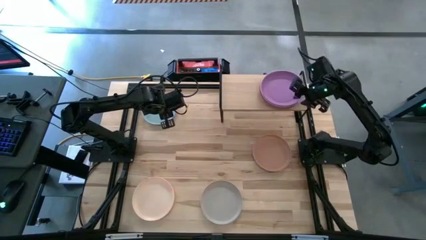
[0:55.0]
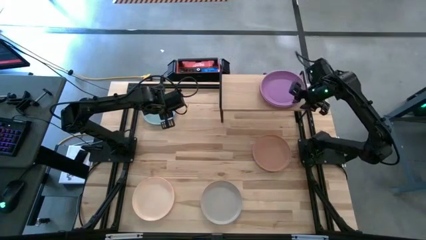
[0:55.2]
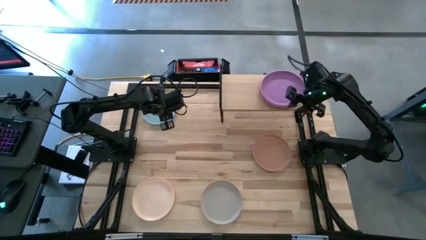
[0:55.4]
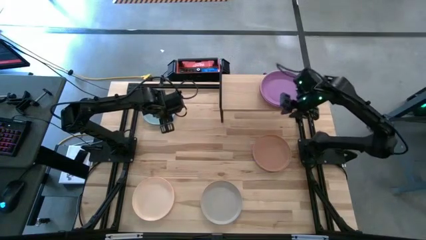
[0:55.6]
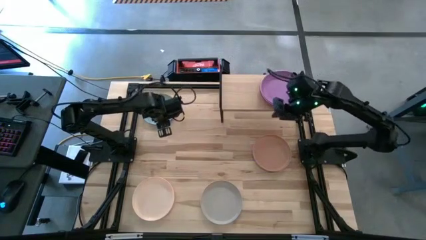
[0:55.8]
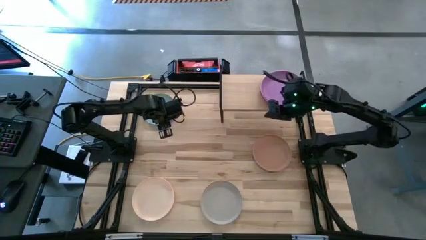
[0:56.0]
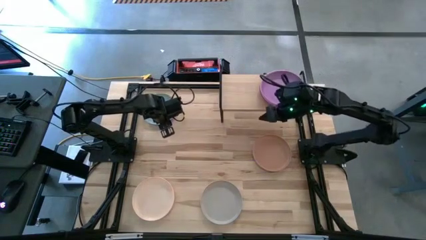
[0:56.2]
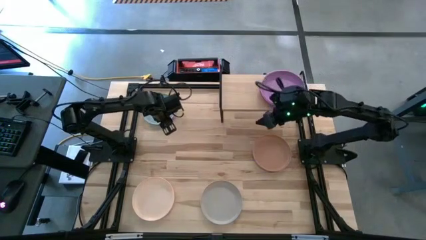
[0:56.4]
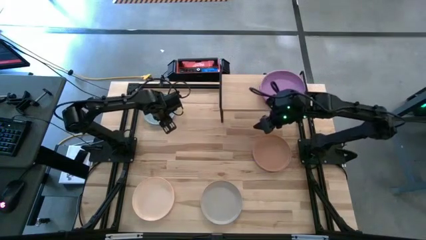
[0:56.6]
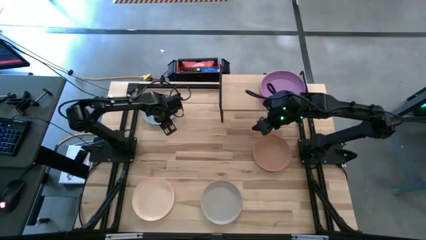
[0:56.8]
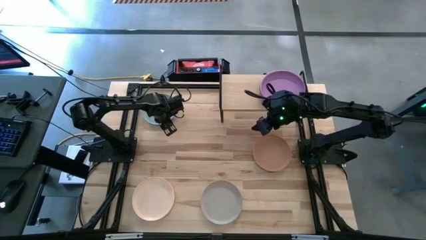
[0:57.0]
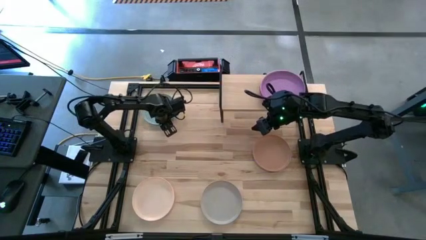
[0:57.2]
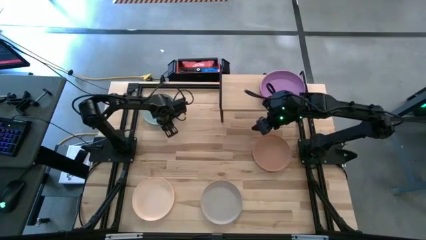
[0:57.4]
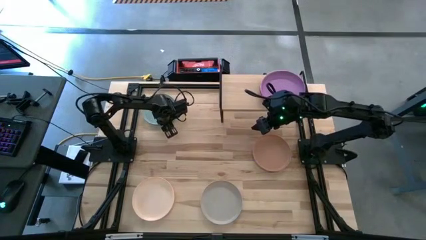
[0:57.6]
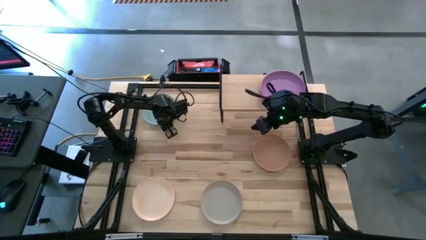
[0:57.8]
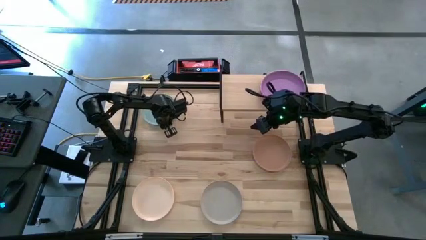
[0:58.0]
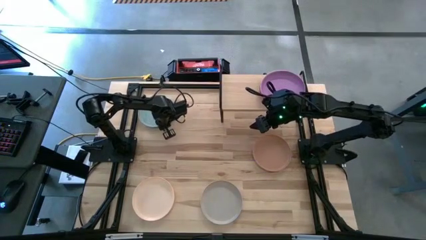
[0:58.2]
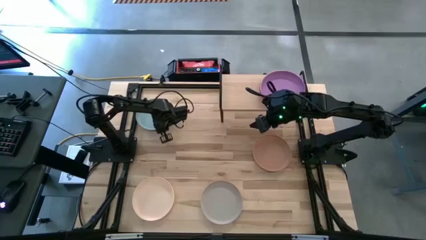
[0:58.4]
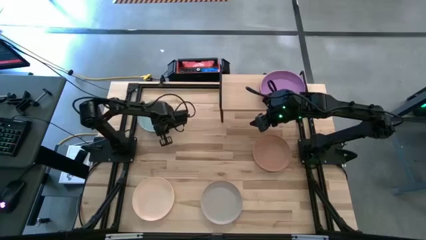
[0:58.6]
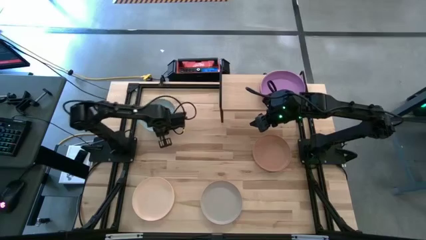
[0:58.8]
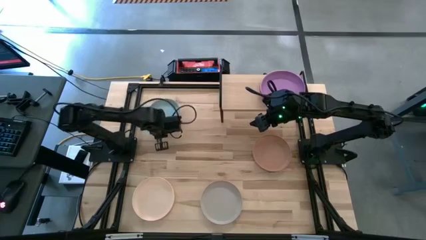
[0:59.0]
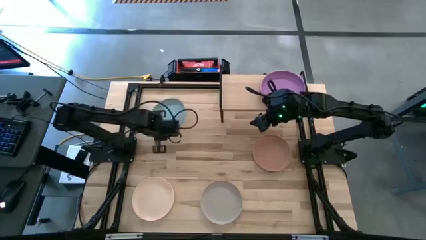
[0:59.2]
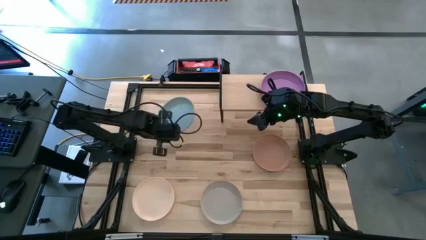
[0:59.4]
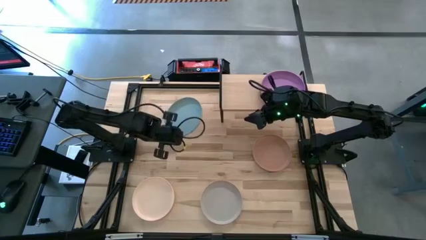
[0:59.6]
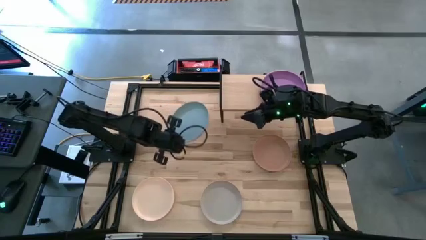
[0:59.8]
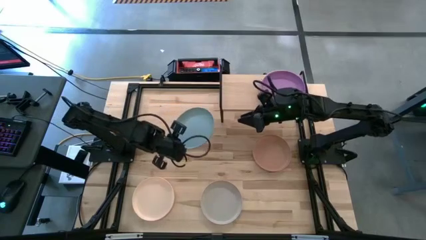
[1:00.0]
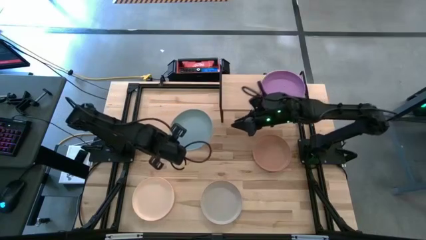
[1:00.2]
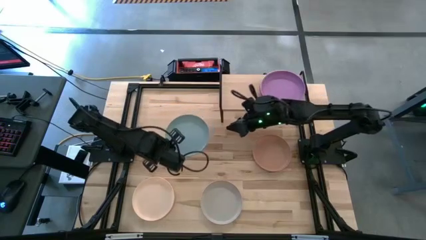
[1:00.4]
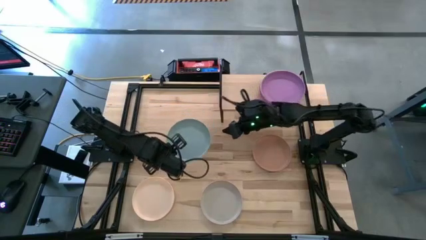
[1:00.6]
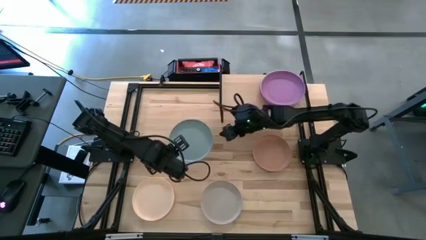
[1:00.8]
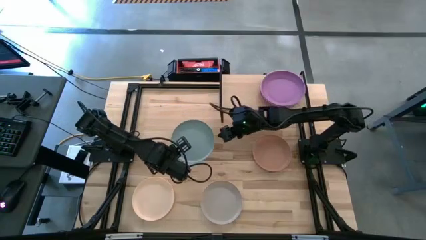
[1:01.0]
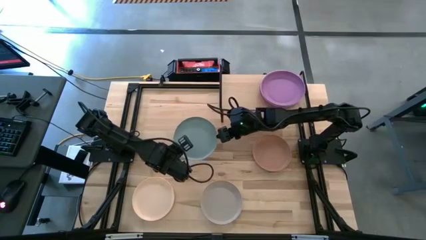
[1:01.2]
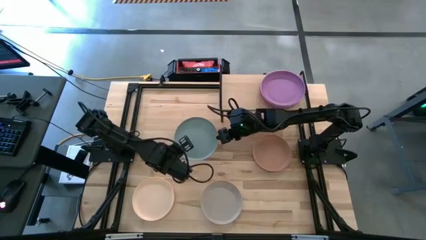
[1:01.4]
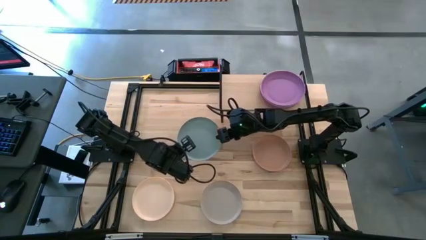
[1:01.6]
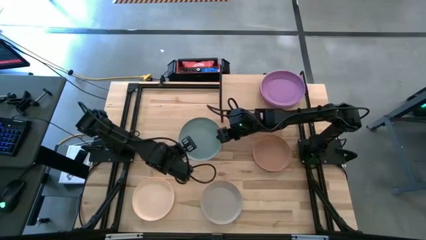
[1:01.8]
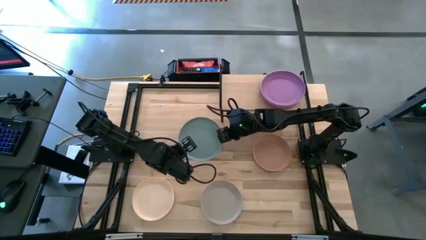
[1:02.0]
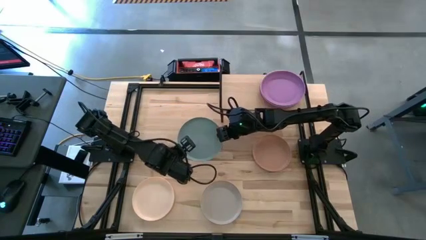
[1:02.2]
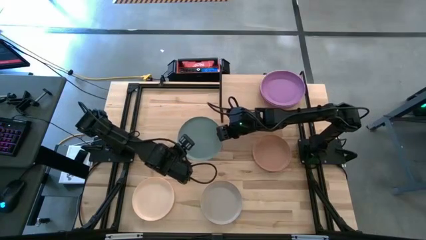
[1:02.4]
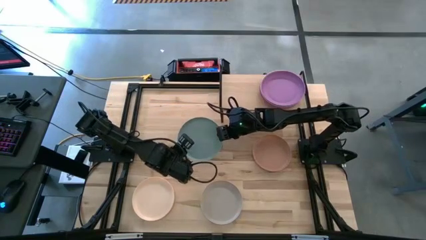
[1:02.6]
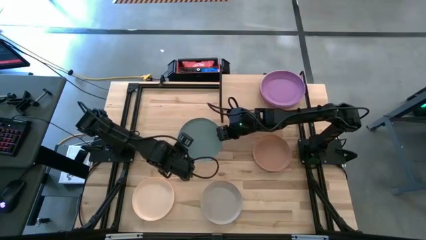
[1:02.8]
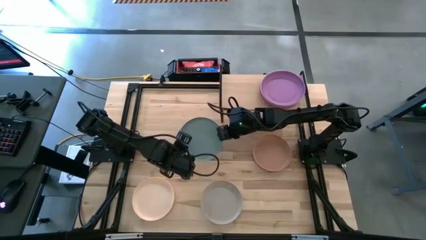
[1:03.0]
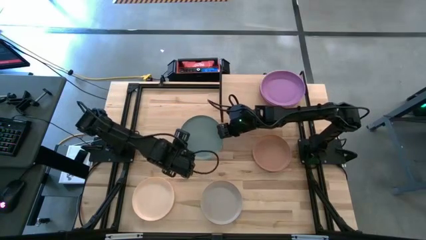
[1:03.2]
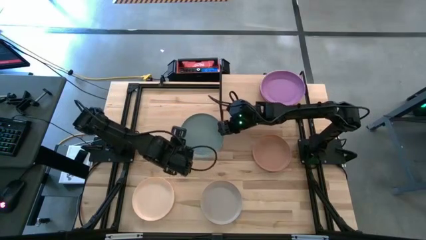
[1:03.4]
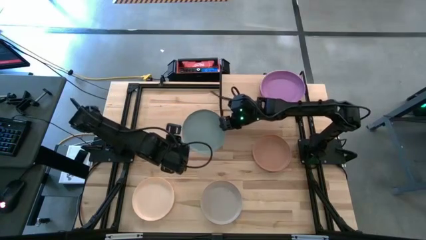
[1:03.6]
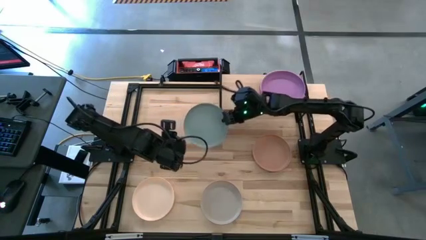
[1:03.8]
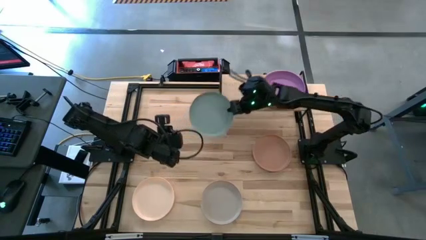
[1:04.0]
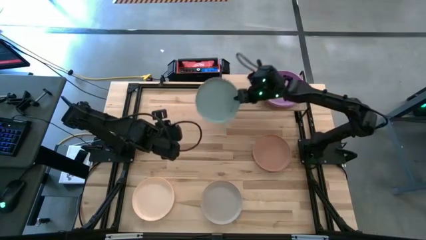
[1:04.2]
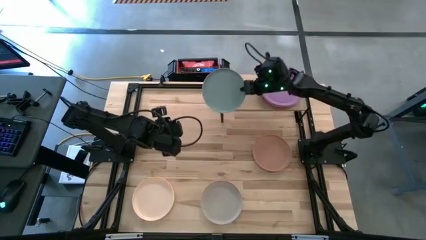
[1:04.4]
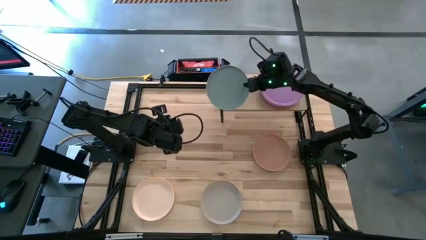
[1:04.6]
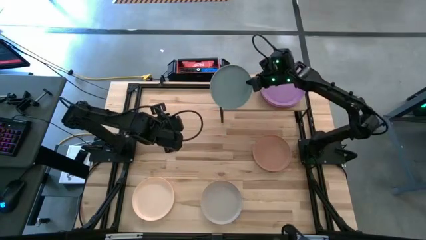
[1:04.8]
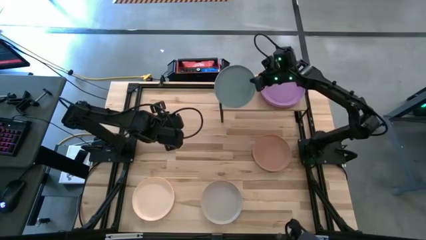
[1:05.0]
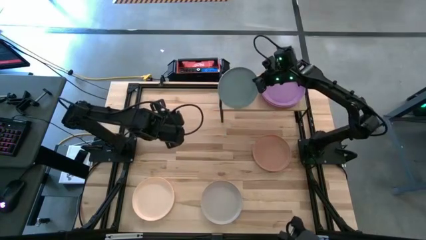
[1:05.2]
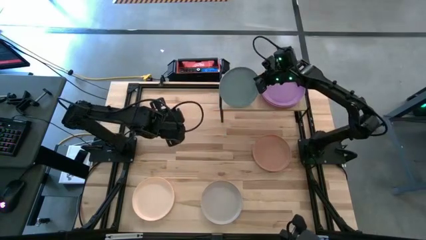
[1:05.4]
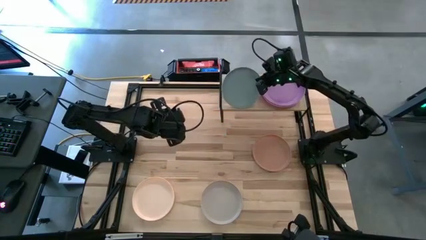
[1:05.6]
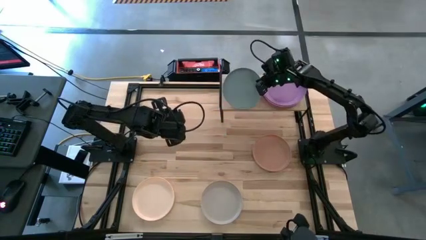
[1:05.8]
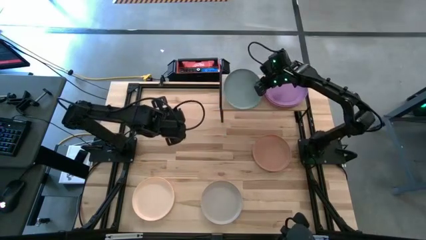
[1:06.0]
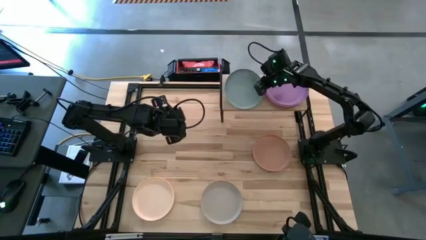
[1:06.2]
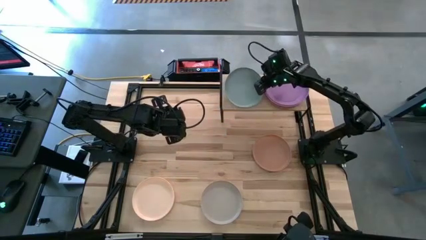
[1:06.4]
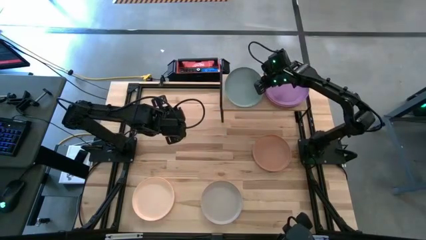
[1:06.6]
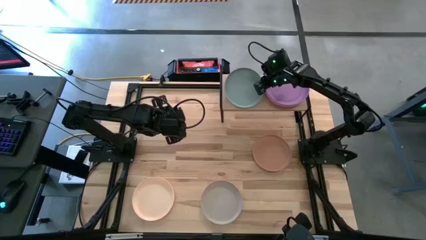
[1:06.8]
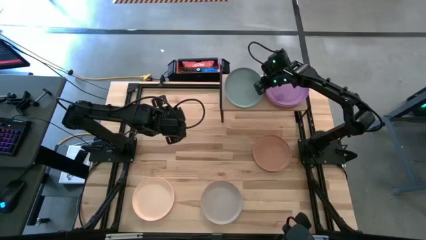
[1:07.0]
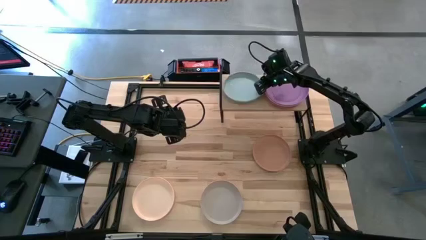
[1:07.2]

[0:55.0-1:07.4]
Task: Place and stack plates onto a shelf
Put the blue plate on the shelf
